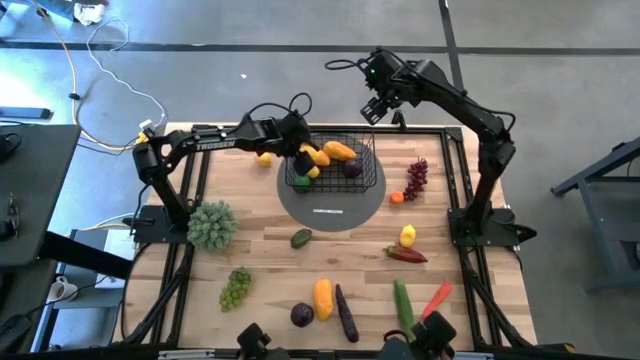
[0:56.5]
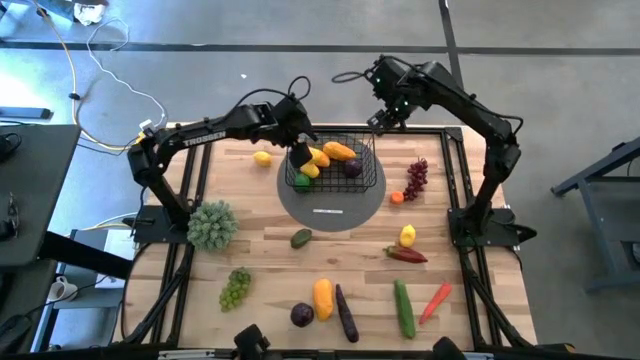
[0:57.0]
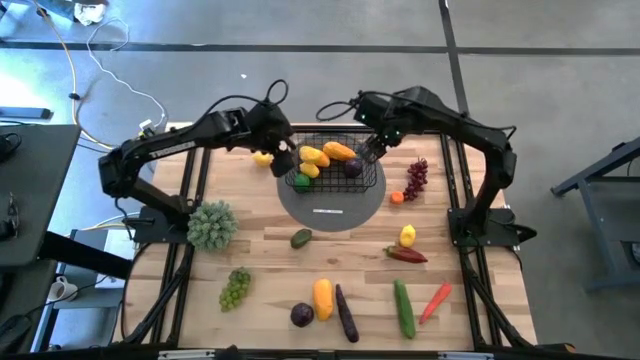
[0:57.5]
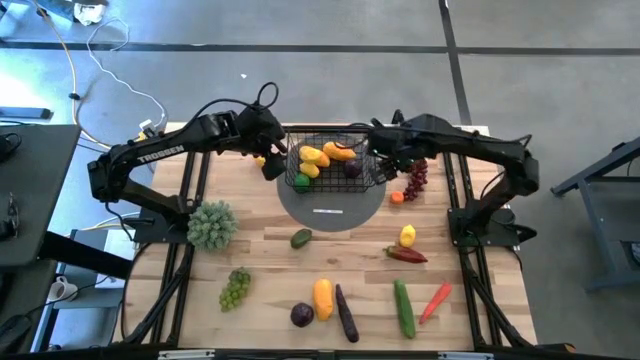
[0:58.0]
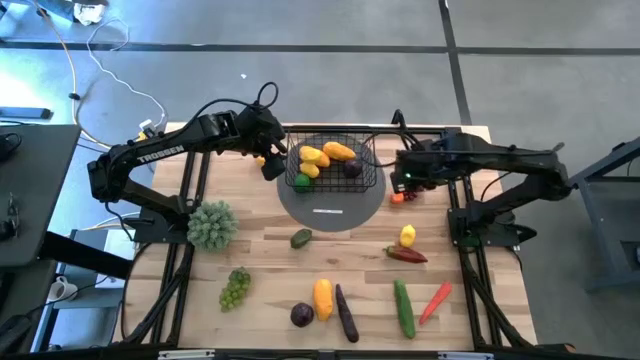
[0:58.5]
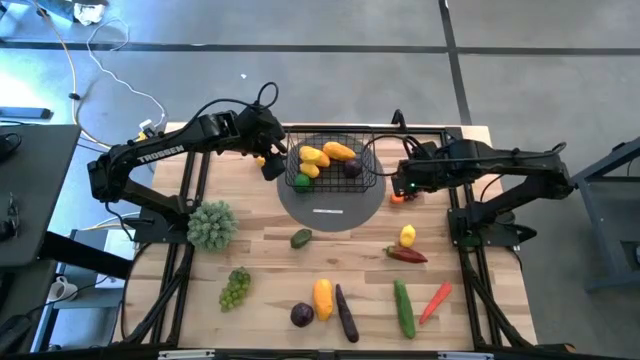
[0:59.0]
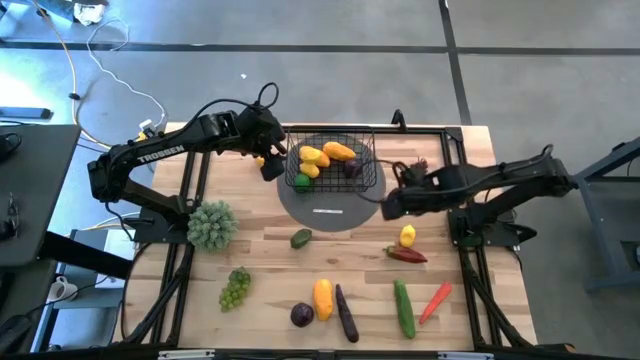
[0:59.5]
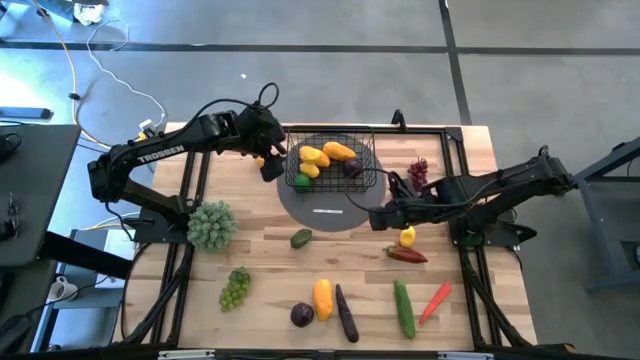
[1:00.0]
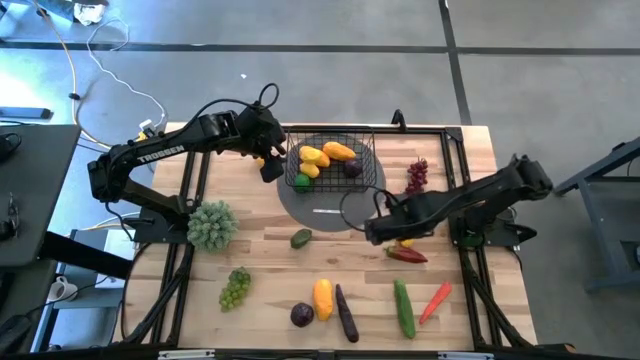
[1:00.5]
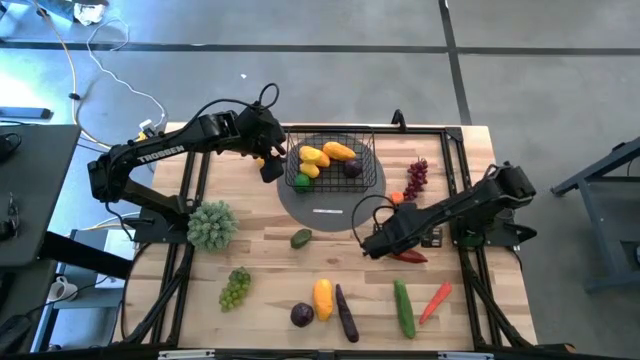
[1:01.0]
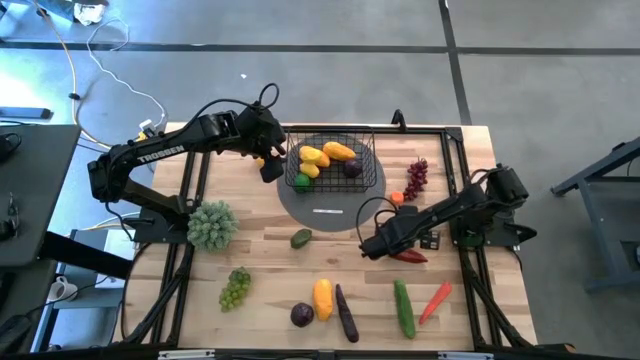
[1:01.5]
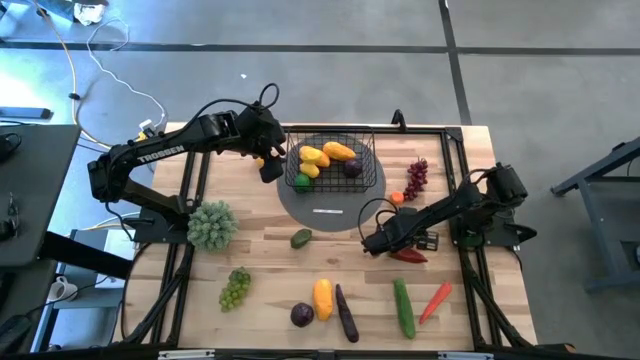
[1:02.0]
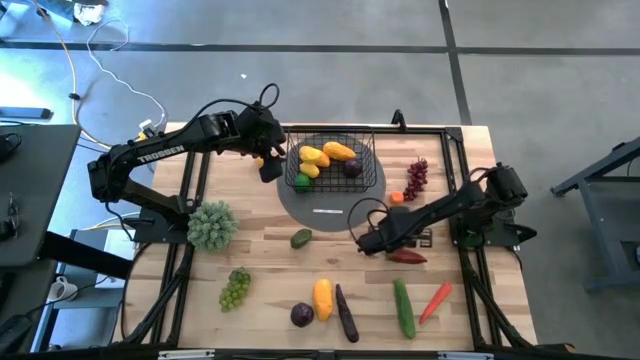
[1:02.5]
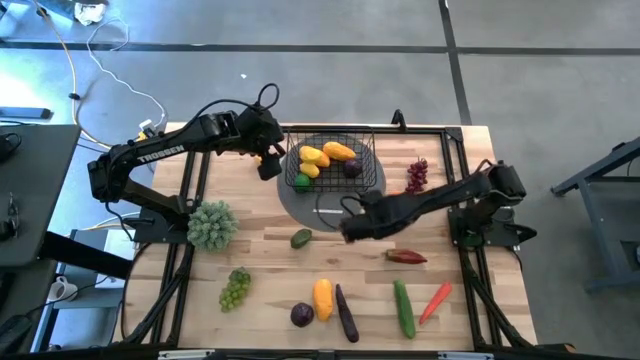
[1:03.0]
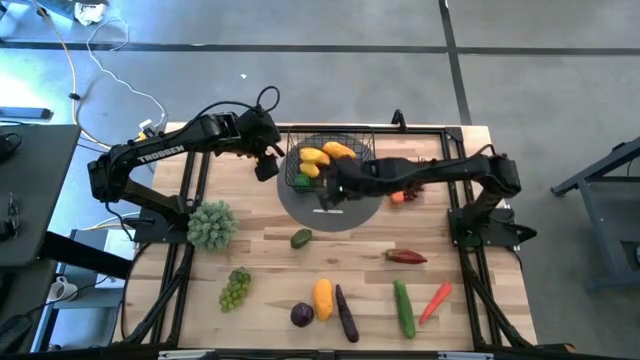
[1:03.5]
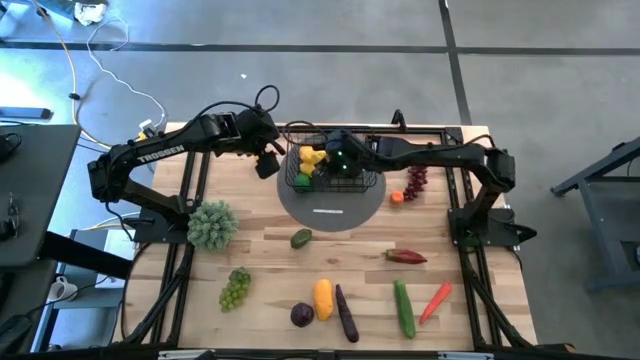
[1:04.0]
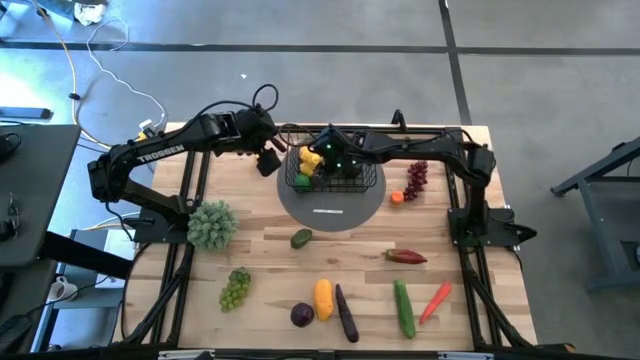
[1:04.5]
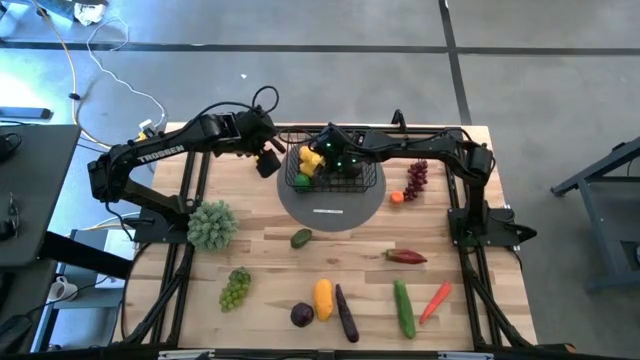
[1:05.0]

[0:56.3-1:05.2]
Task: Build produce basket
Put the yellow lemon into the wire basket

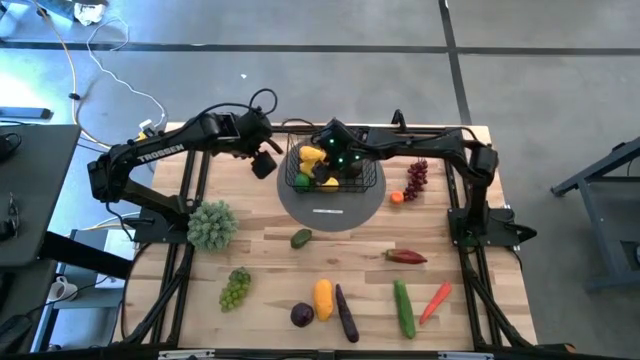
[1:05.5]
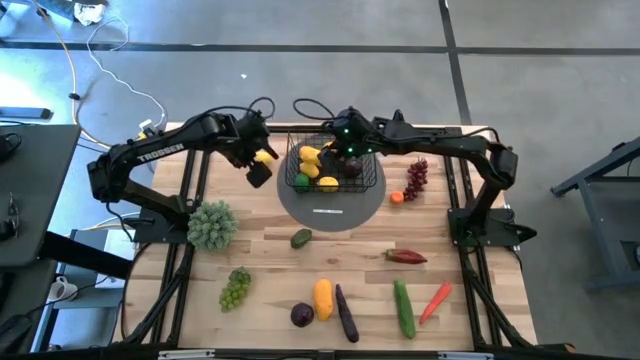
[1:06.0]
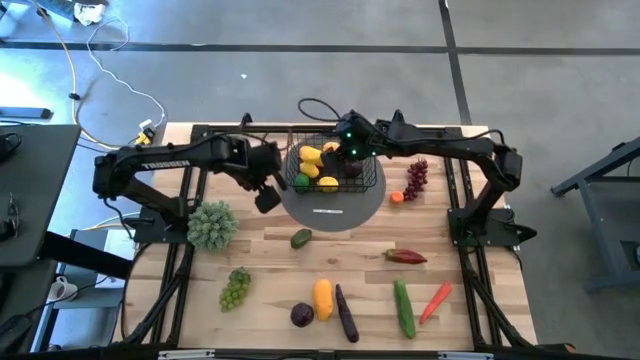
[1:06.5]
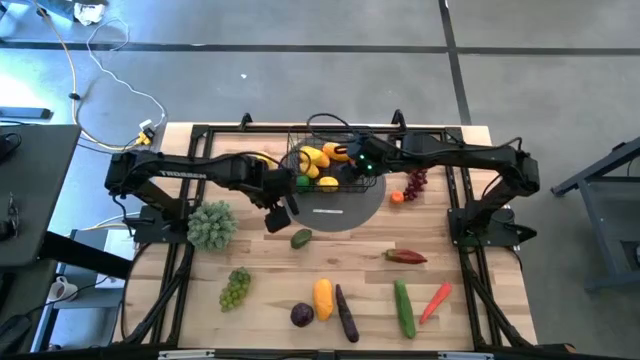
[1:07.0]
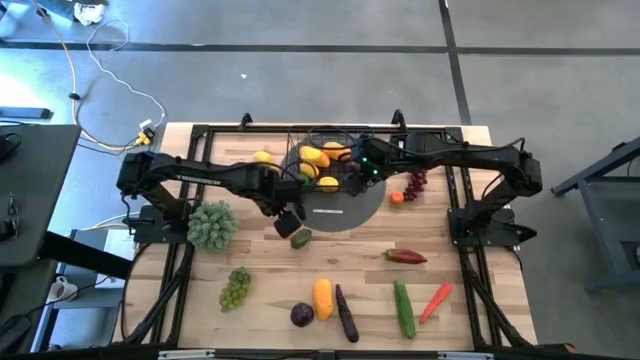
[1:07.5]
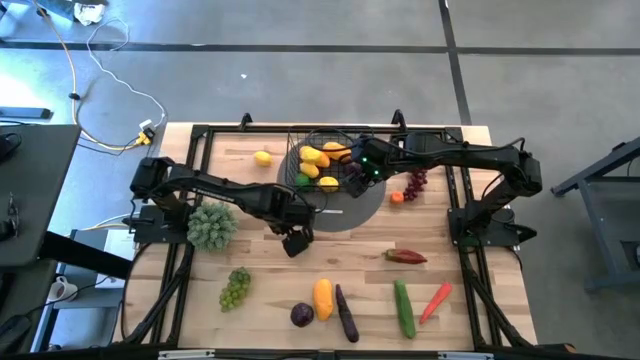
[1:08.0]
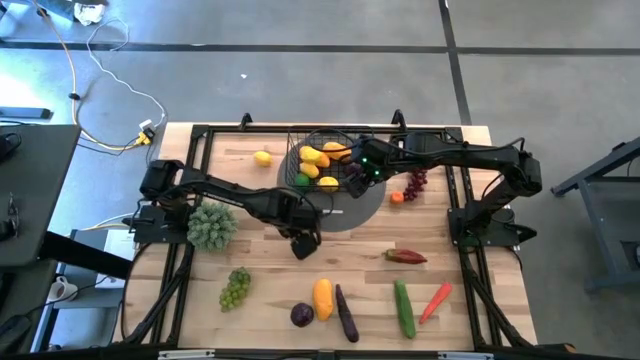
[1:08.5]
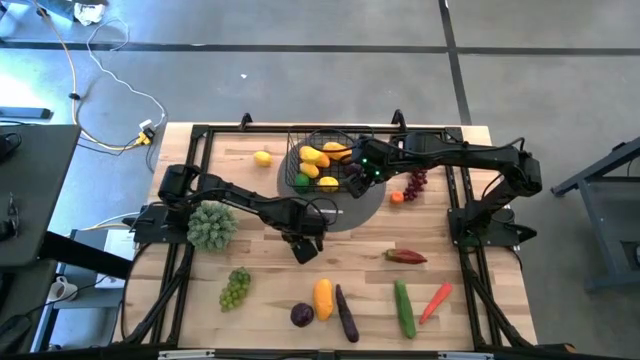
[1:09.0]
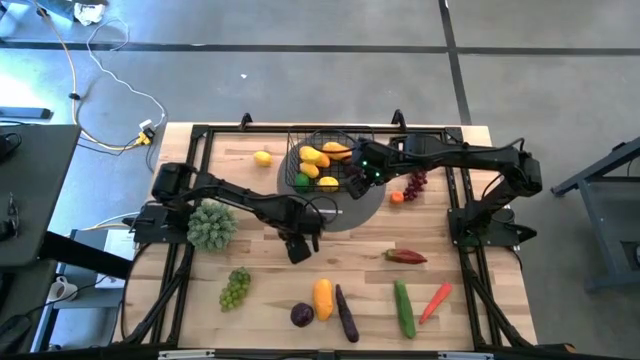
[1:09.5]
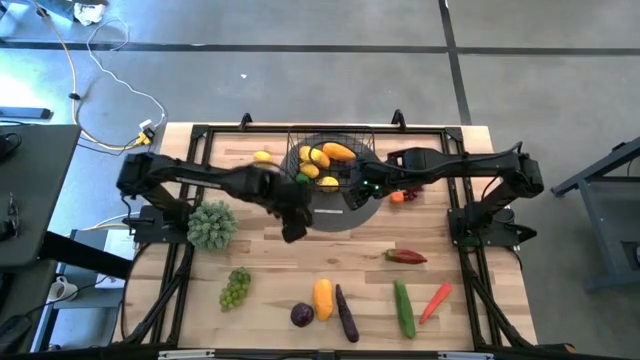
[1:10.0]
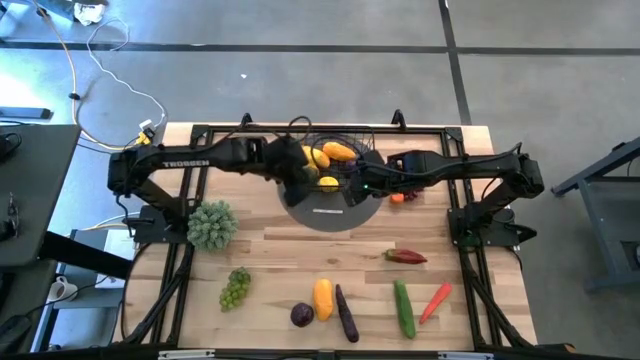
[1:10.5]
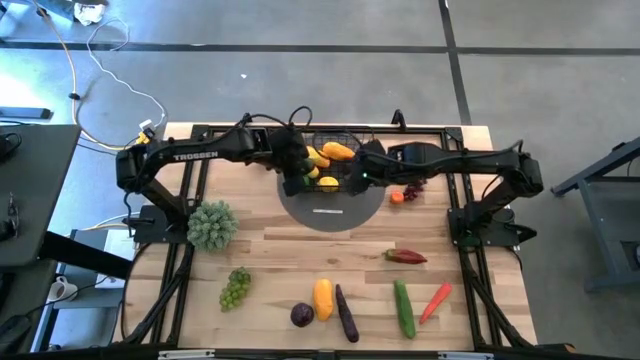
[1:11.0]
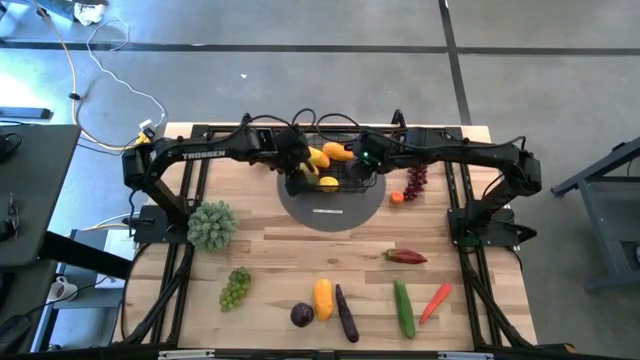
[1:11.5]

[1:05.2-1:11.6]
Put the green lime into the wire basket

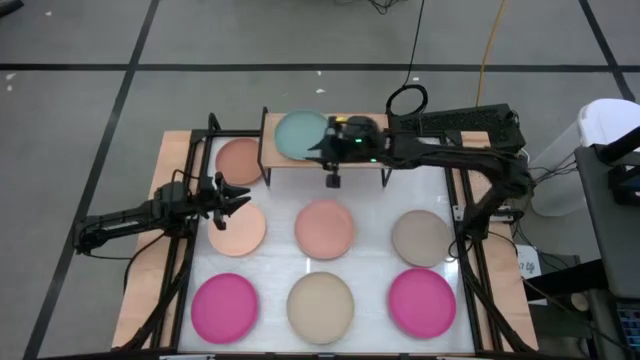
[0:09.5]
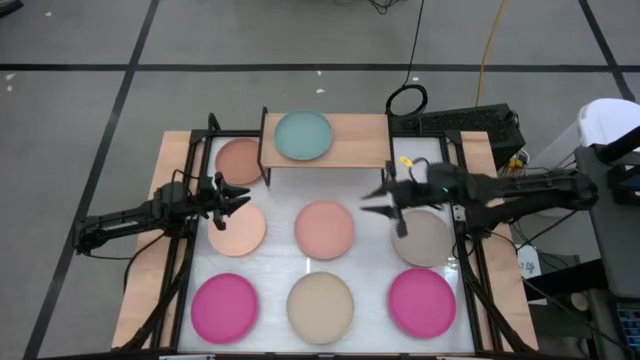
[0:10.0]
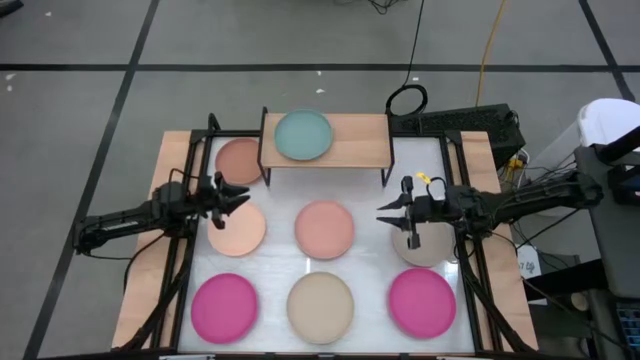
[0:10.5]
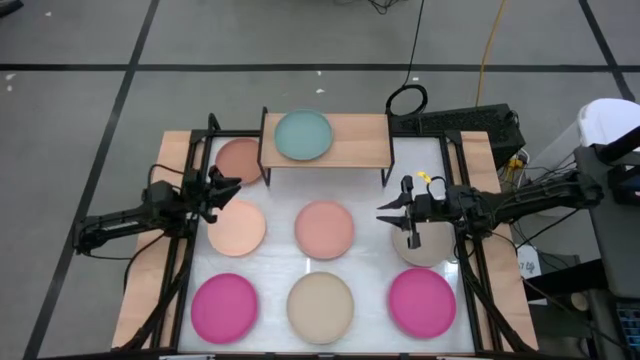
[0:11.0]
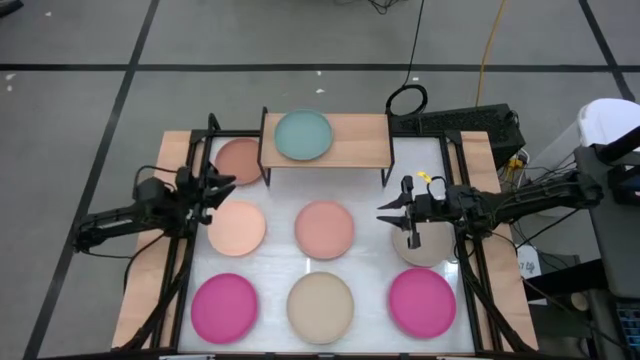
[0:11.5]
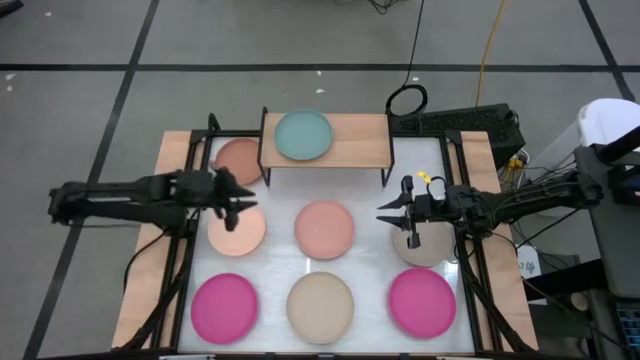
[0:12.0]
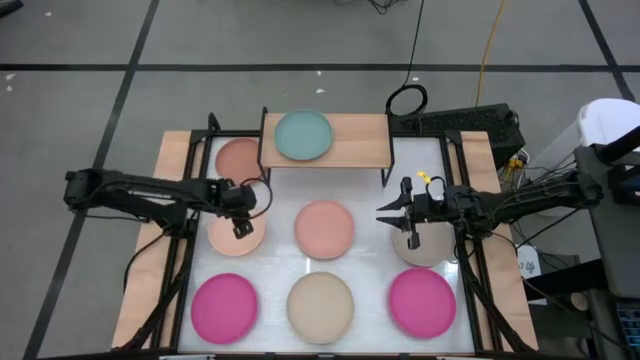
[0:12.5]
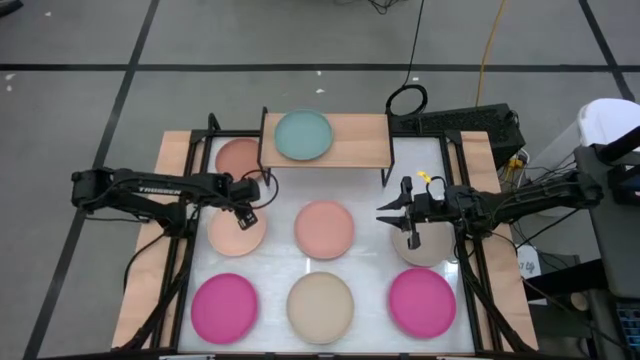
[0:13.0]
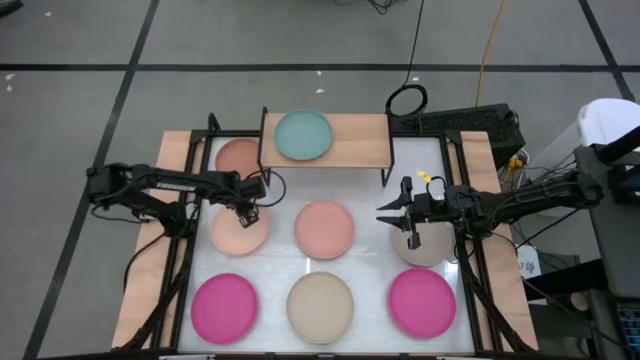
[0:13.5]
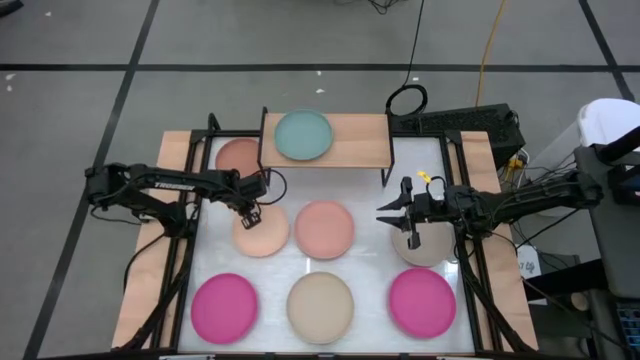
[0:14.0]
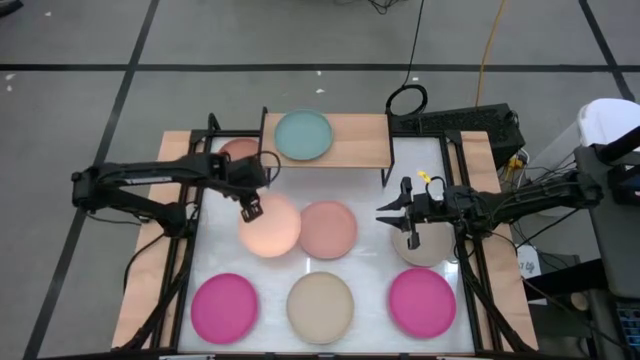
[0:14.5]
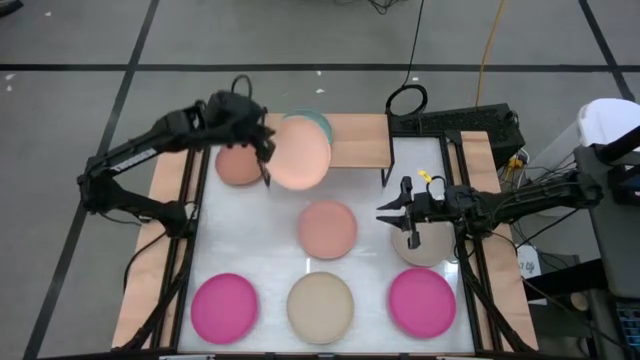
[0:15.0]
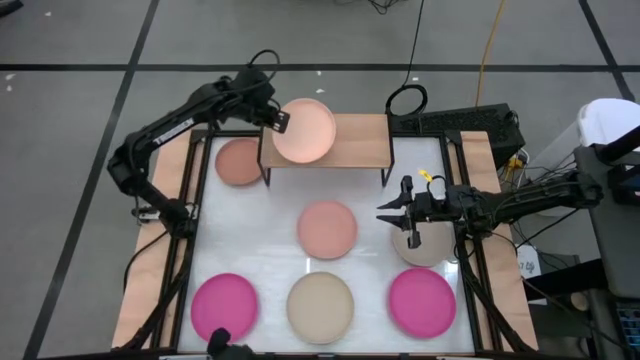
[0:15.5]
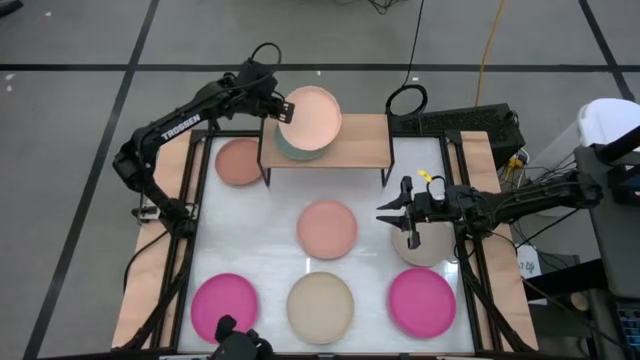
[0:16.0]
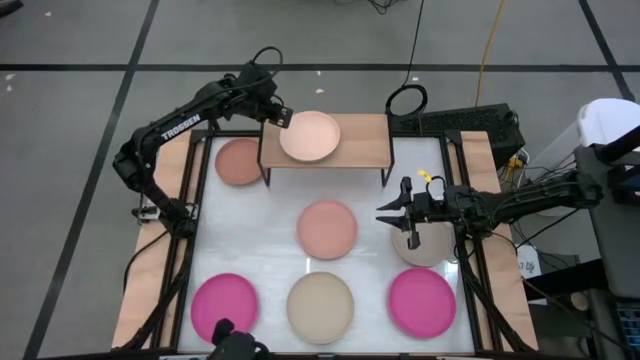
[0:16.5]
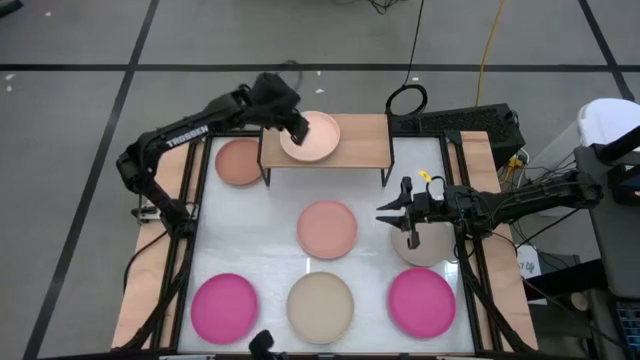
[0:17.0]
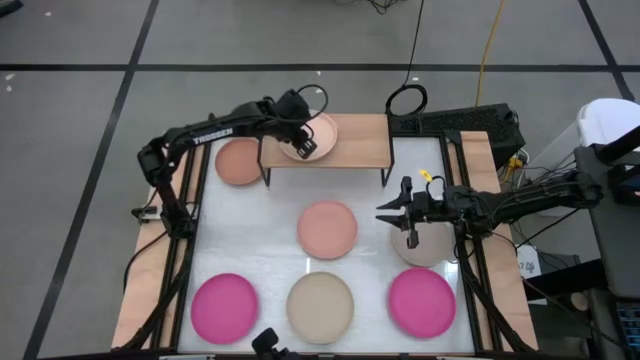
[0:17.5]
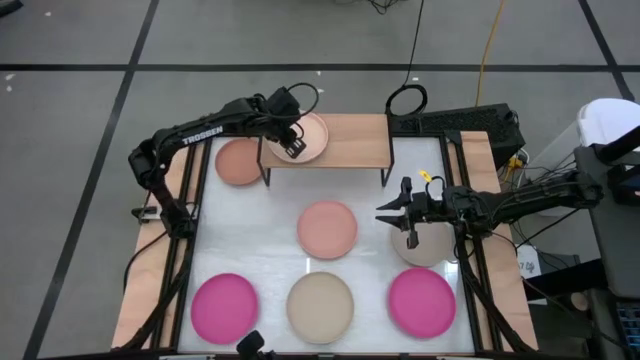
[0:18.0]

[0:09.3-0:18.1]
Task: Place and stack plates onto a shelf
Stack the light orange plate on top of the light blue plate on the shelf
